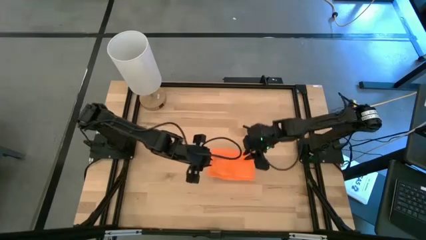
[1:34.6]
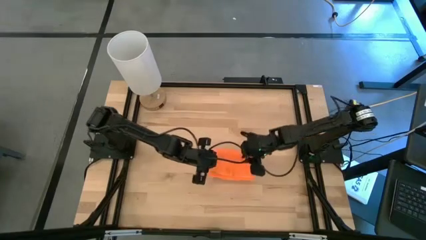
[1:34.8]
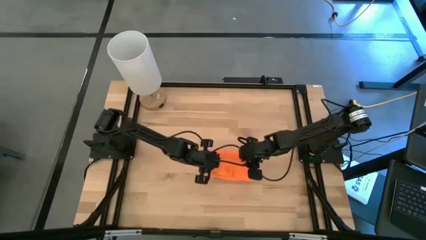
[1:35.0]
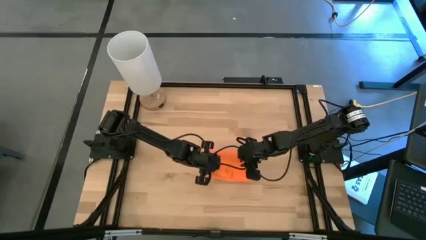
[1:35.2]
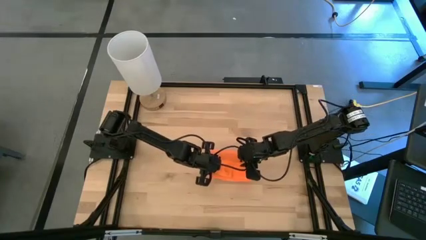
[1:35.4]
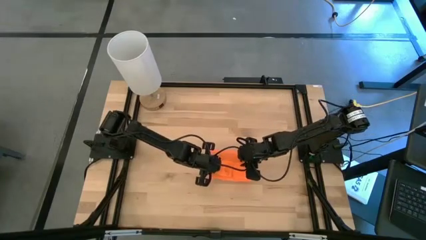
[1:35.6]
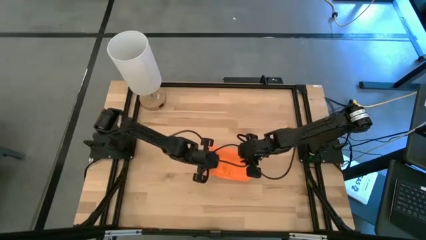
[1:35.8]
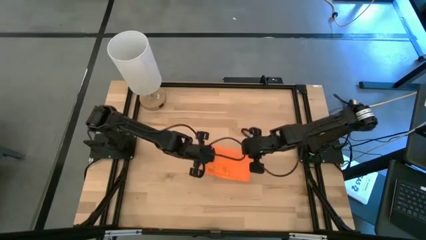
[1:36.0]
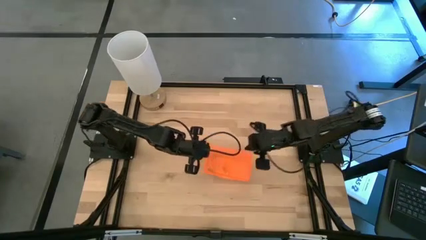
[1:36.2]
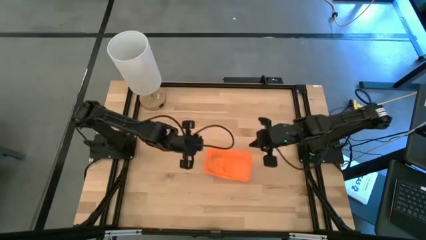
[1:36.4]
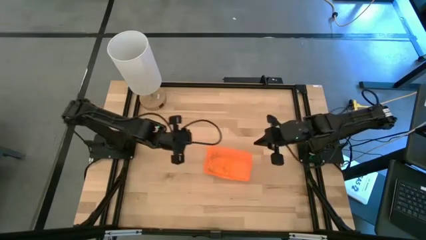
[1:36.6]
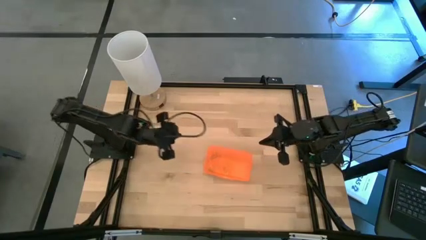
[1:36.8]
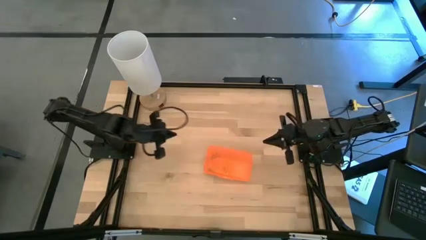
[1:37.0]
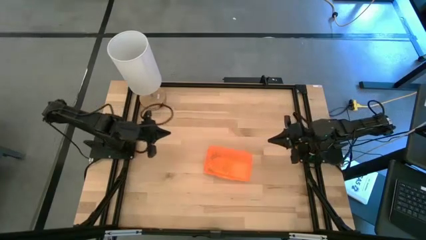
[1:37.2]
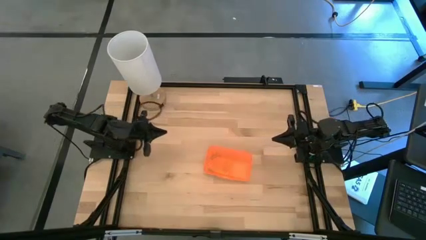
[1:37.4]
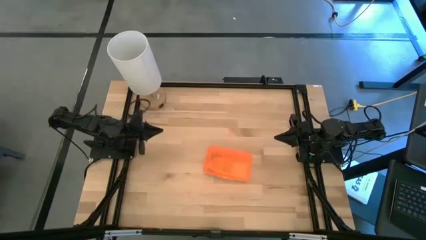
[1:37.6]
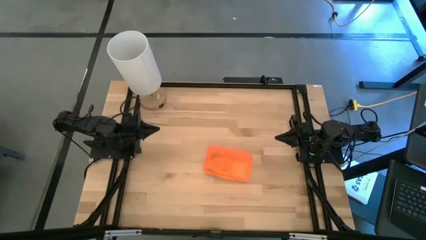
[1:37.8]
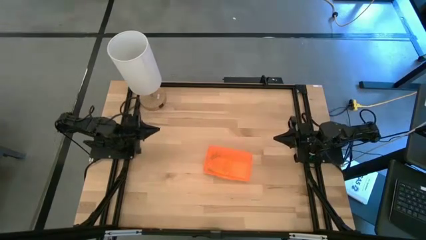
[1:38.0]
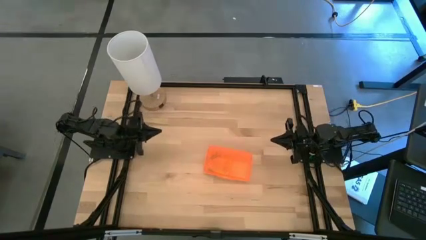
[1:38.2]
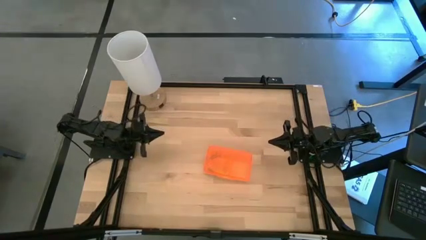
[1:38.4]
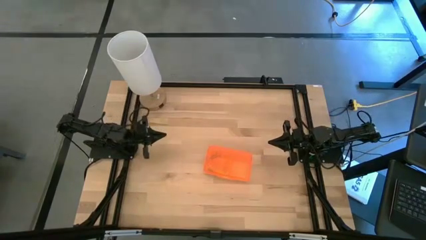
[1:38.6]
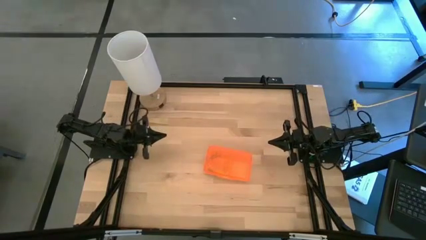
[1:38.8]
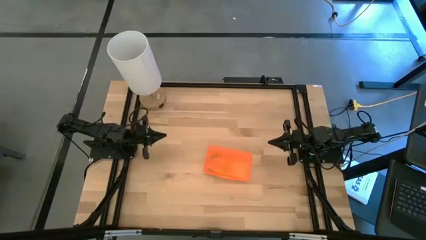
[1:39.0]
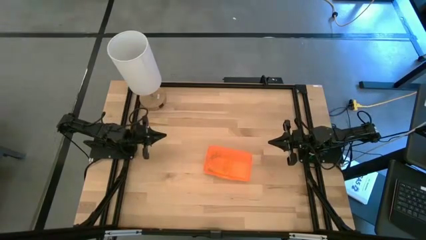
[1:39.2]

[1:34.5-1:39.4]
Task: Pack school essentials
Return to Home Position

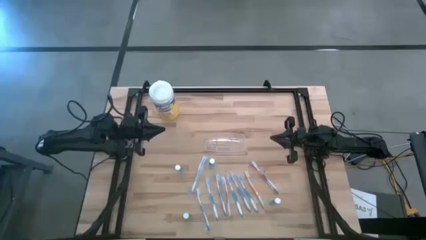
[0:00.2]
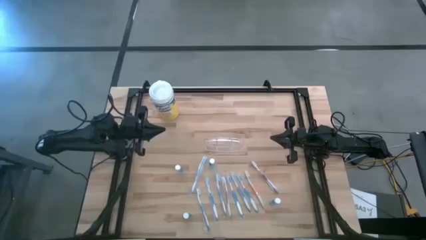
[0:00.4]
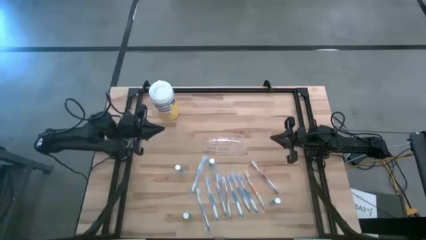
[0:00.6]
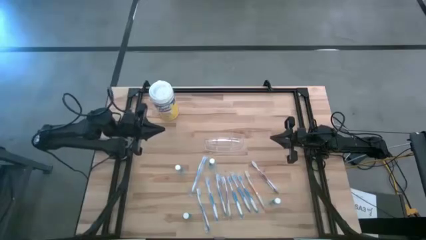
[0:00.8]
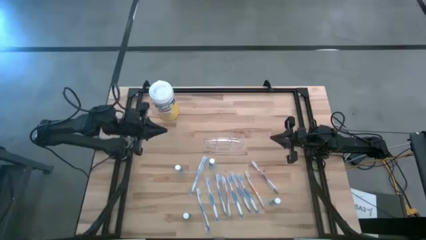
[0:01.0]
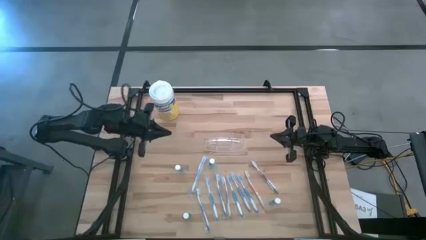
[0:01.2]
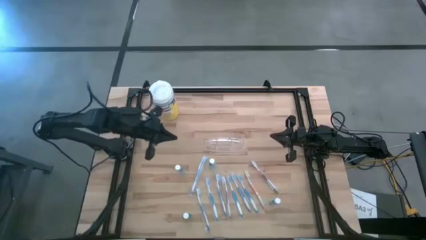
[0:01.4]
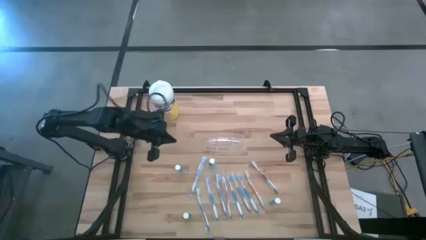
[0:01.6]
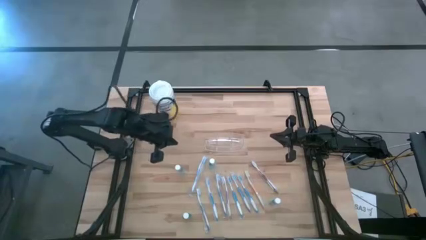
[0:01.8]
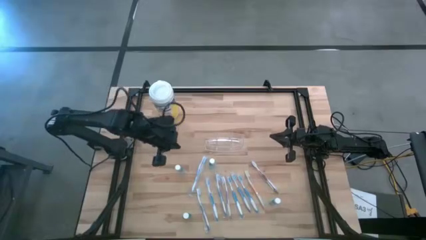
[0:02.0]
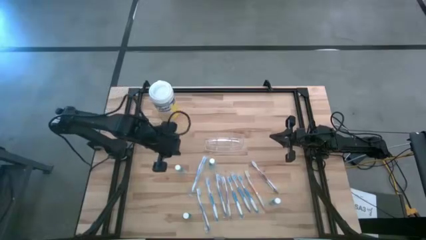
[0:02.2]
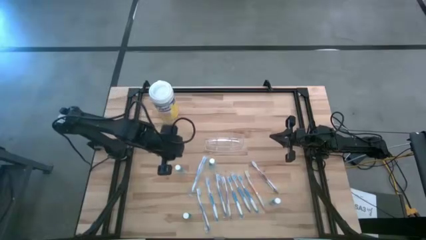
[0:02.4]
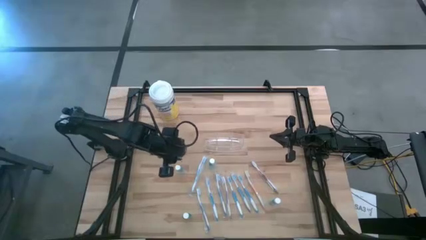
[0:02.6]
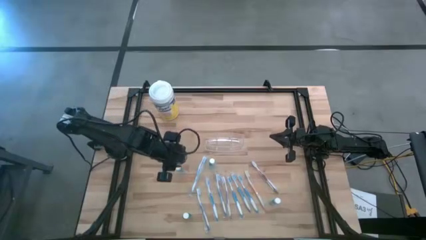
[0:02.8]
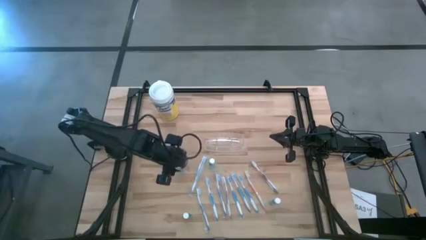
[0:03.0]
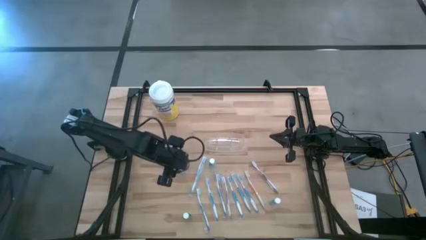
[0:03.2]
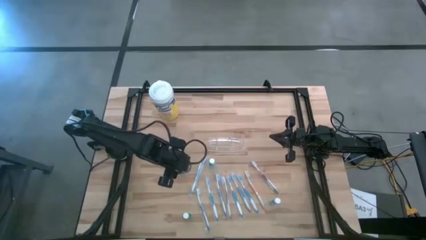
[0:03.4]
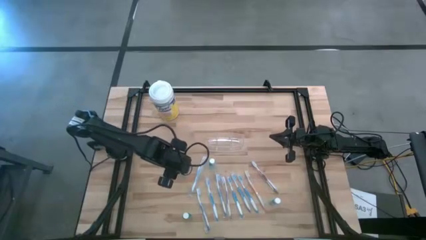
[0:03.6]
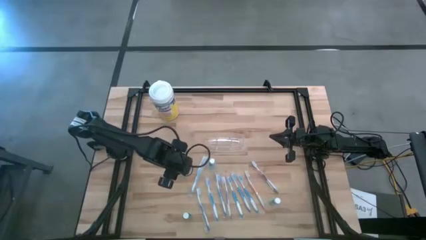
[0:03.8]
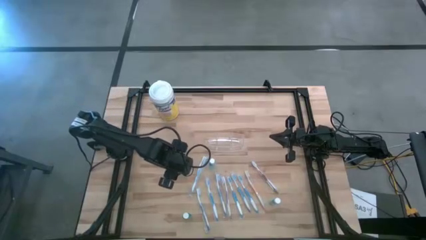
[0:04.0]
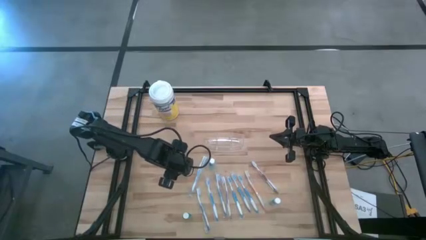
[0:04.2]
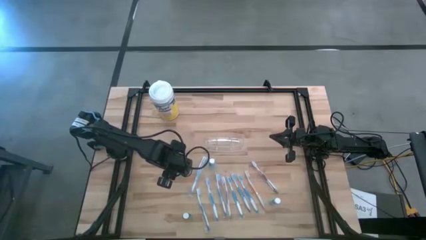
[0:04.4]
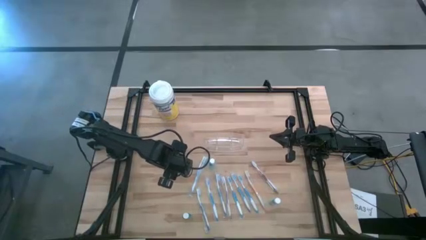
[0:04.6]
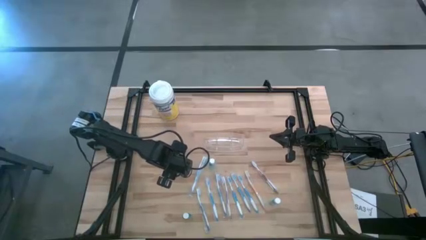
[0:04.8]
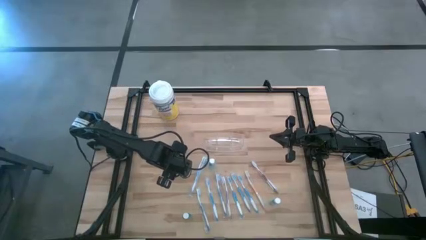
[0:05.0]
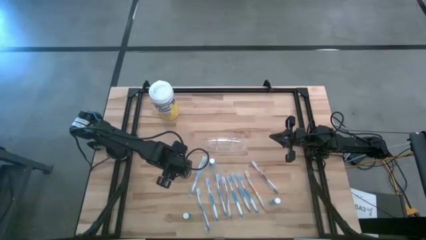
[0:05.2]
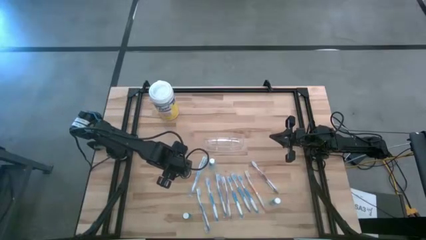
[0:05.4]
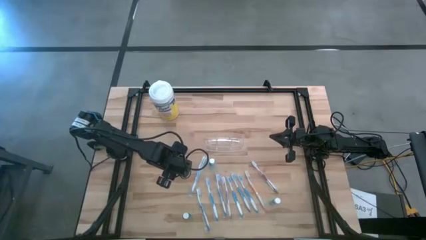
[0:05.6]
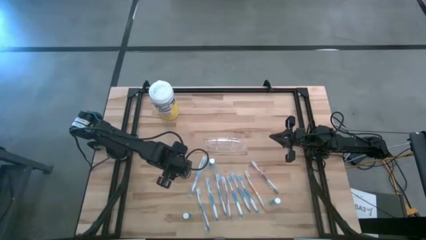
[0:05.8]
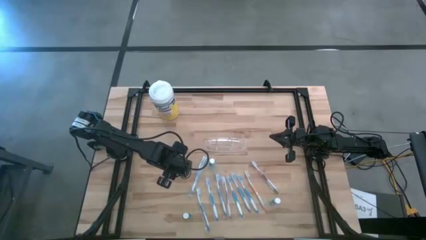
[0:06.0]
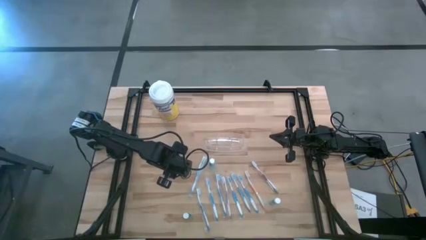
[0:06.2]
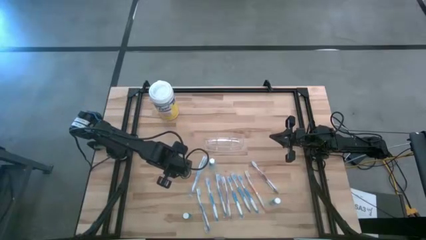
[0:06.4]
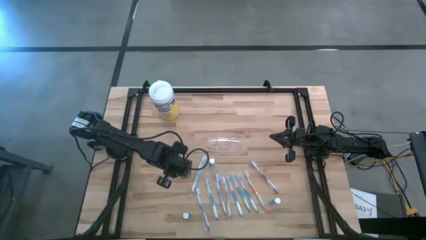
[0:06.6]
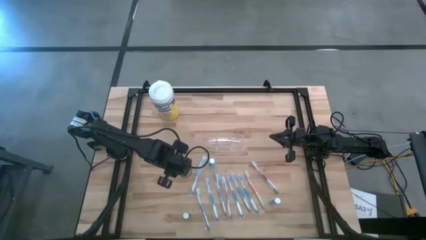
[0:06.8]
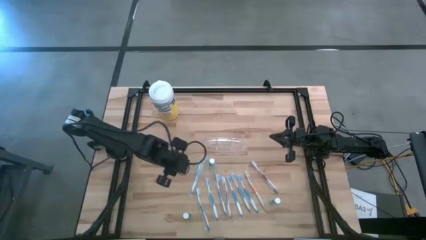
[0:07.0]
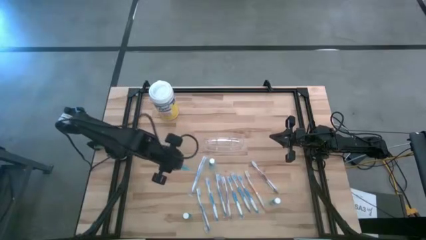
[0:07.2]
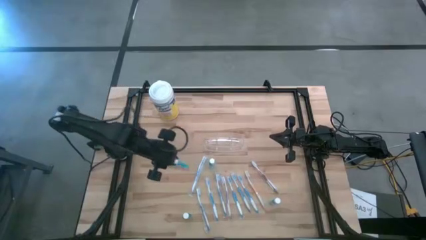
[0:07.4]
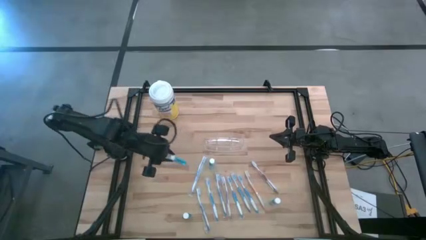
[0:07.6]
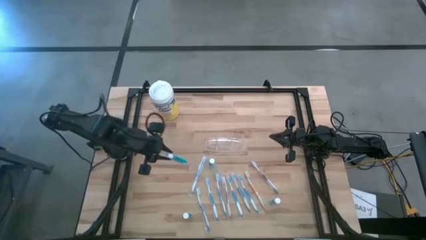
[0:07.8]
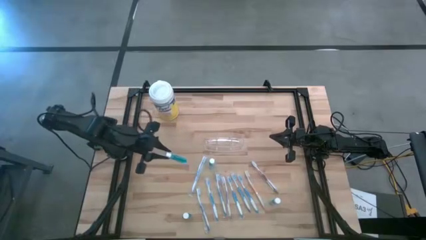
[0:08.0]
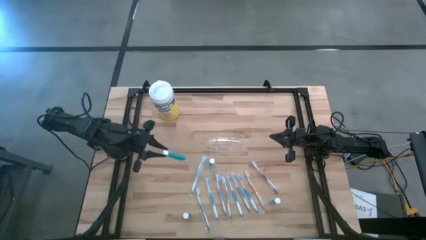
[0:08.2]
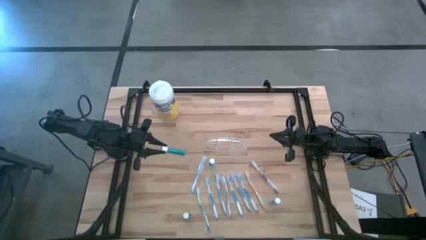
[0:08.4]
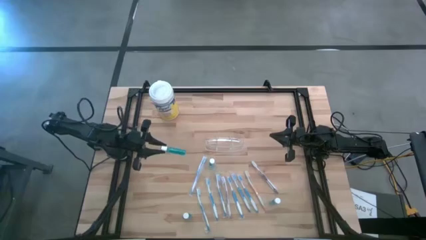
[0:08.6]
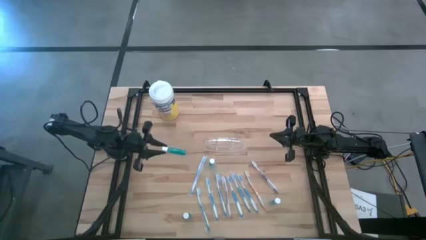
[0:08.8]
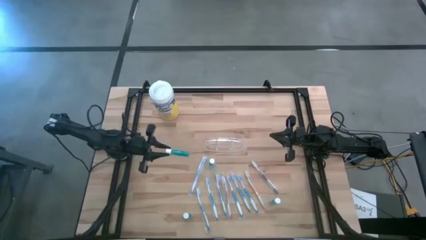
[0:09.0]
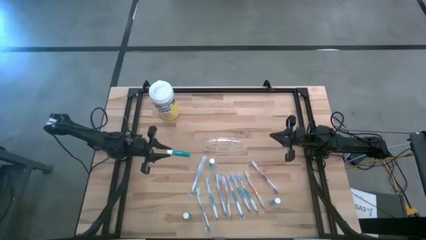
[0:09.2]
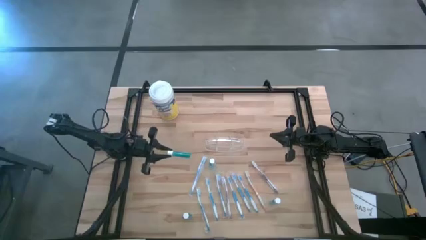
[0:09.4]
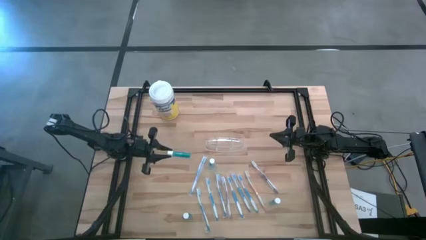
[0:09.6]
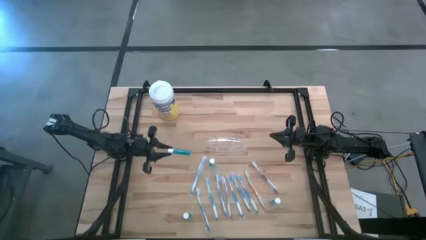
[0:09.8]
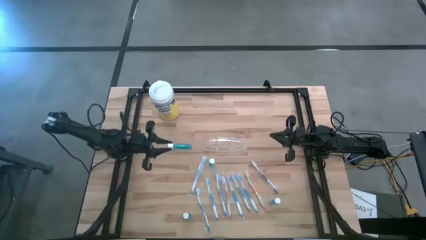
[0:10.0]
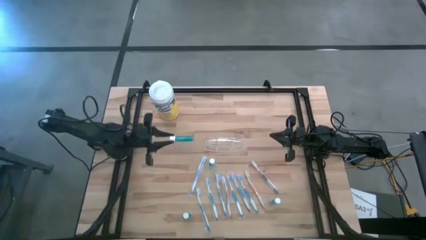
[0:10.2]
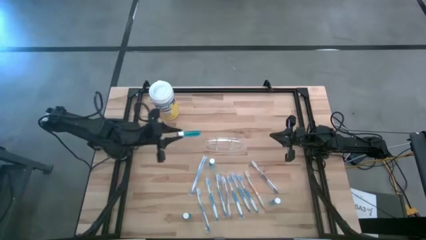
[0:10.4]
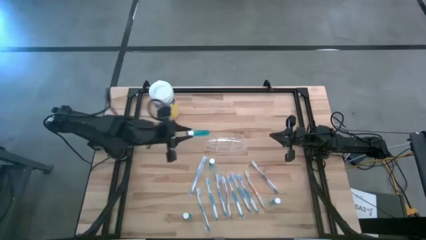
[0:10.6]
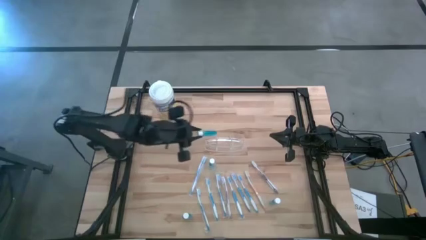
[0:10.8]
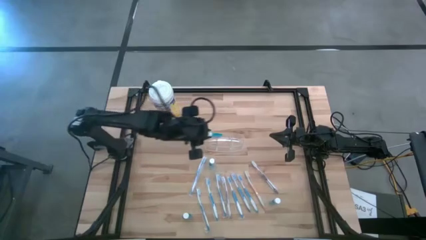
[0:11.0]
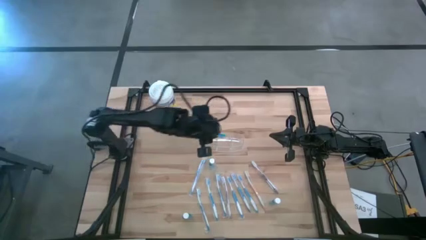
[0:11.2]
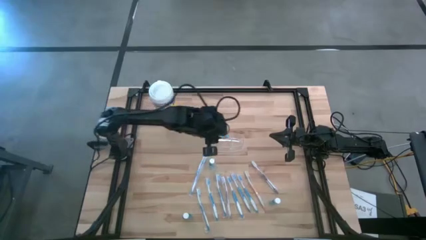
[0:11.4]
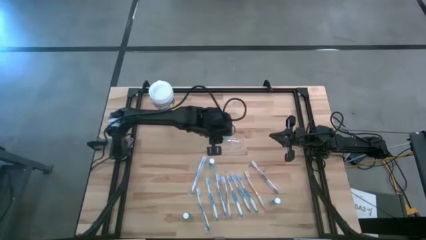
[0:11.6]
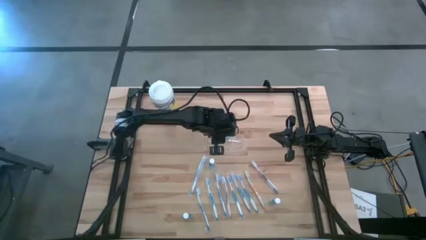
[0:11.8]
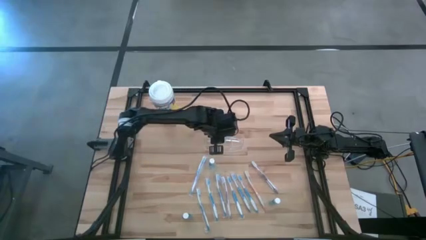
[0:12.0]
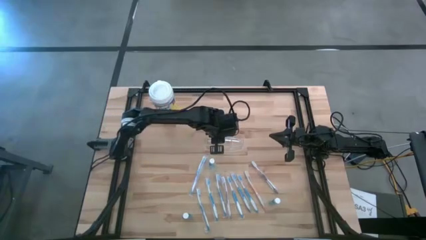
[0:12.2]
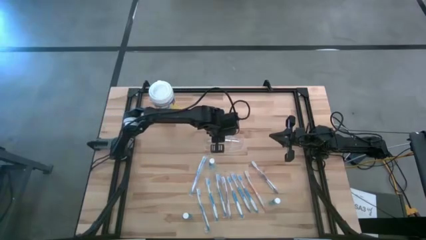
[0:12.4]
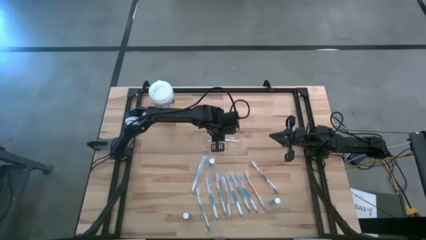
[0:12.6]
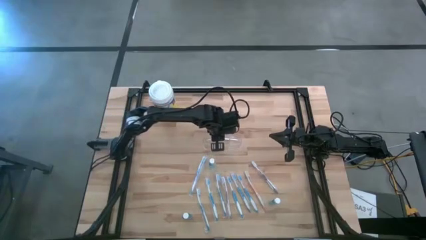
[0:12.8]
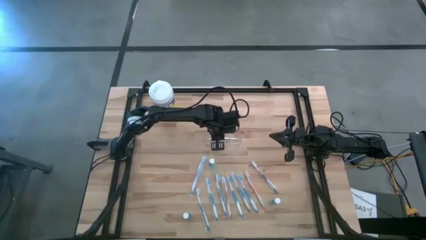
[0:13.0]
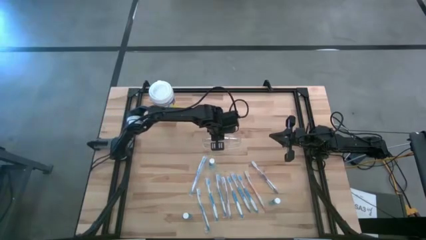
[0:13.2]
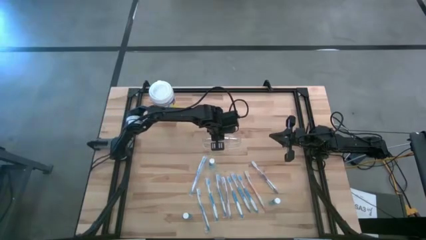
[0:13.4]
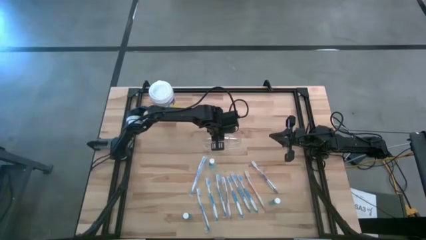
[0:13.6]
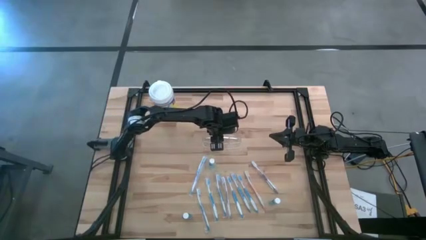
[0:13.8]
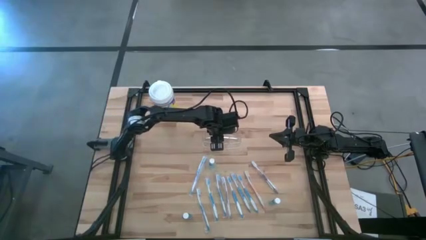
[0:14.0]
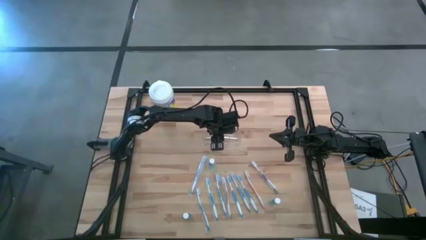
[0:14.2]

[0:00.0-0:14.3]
Task: Pick & Place toothbrushing station
Put the blue mouthwash bottle into the middle section of the transparent organizer
